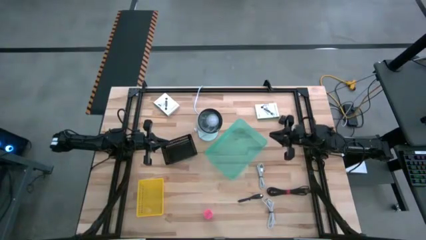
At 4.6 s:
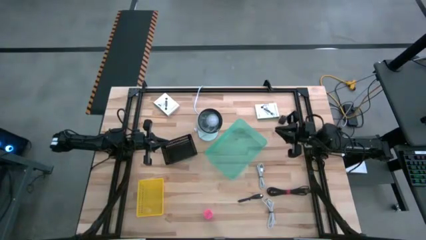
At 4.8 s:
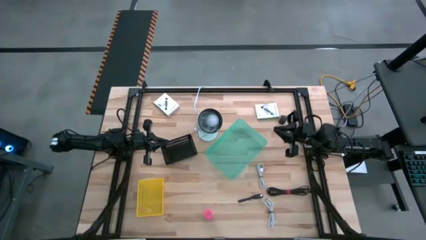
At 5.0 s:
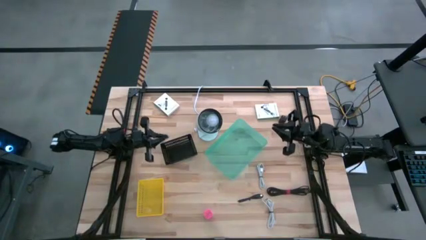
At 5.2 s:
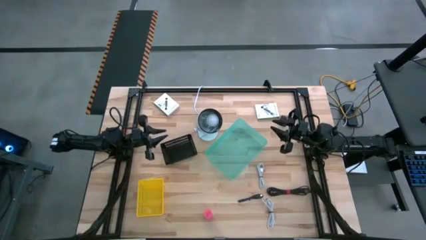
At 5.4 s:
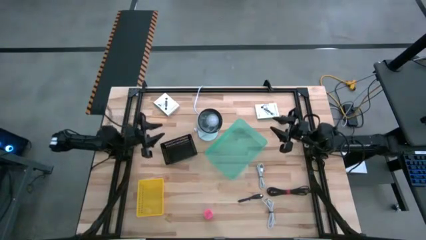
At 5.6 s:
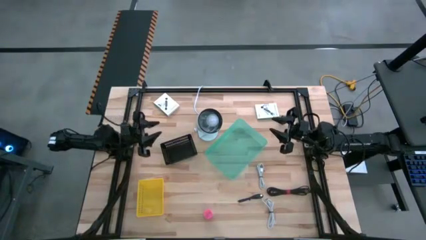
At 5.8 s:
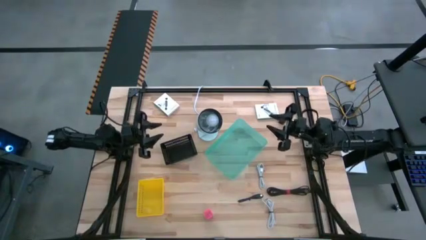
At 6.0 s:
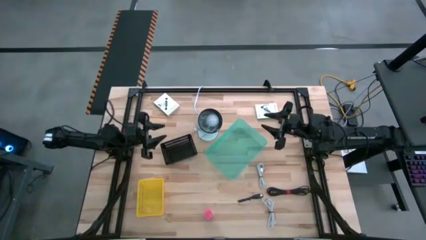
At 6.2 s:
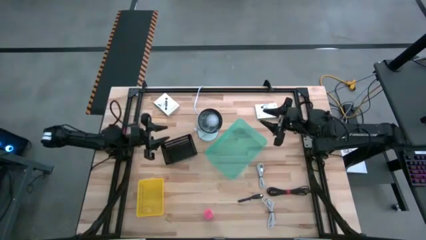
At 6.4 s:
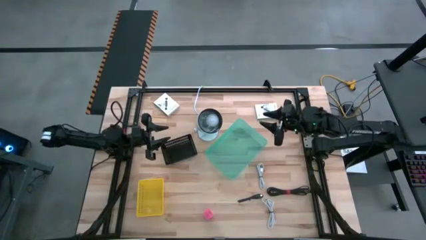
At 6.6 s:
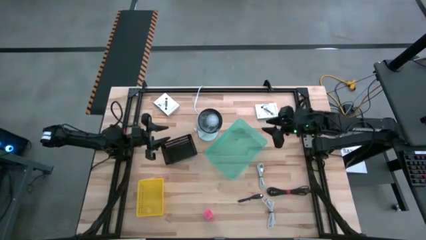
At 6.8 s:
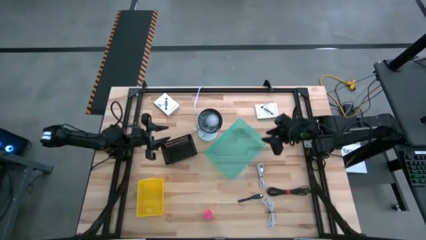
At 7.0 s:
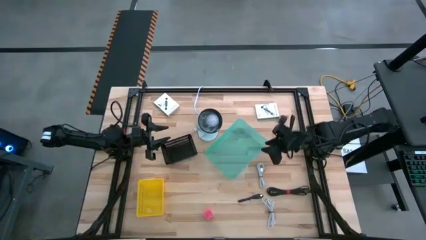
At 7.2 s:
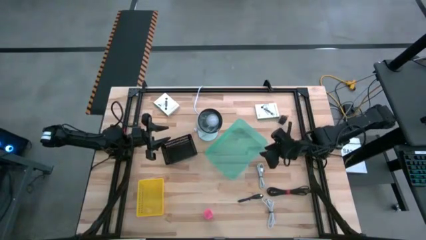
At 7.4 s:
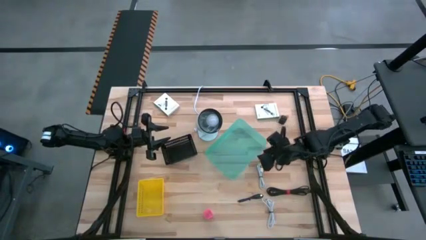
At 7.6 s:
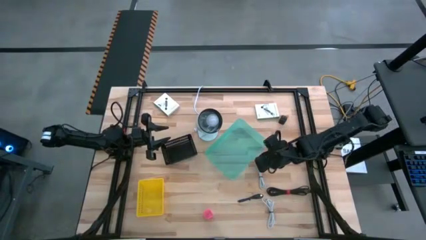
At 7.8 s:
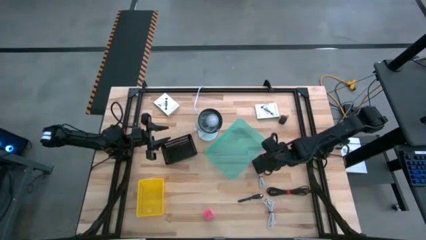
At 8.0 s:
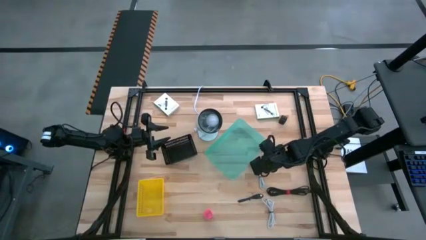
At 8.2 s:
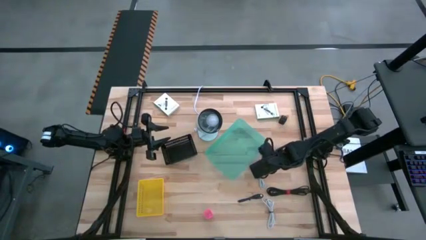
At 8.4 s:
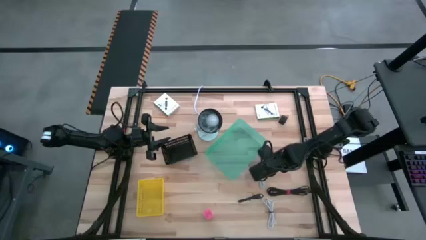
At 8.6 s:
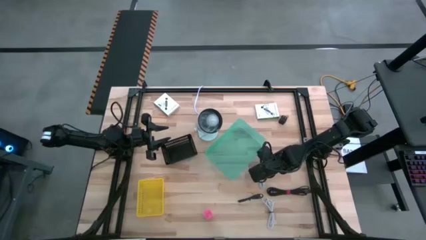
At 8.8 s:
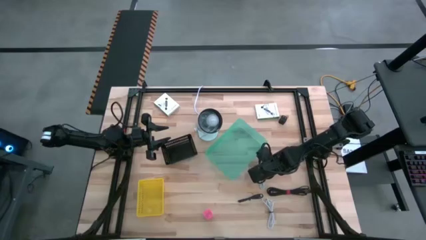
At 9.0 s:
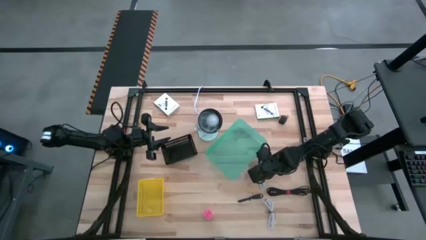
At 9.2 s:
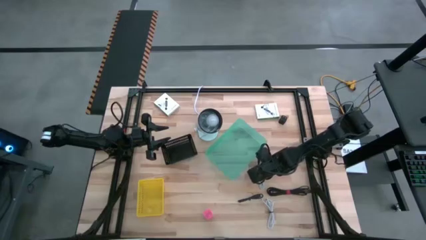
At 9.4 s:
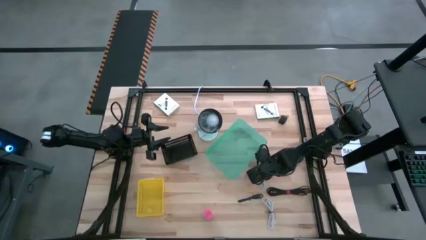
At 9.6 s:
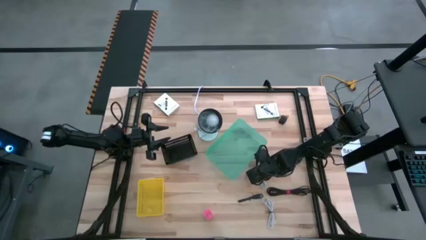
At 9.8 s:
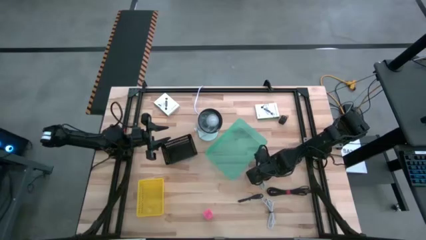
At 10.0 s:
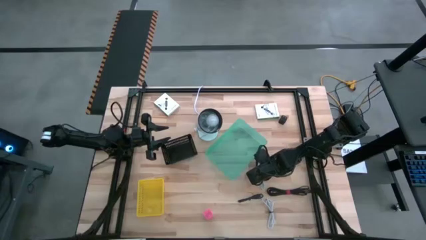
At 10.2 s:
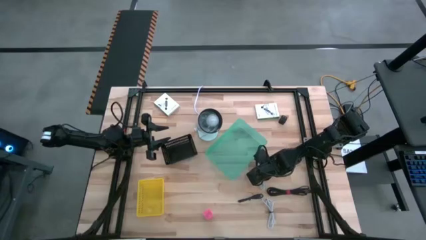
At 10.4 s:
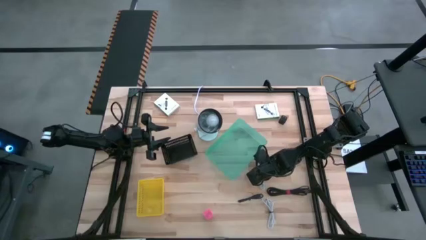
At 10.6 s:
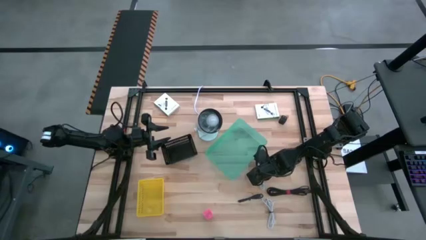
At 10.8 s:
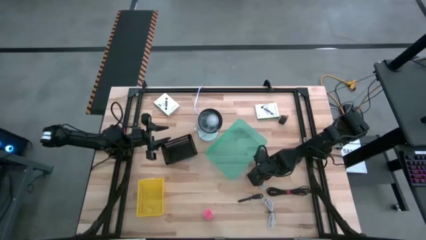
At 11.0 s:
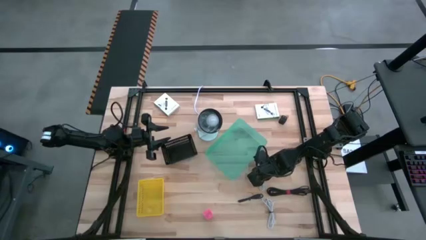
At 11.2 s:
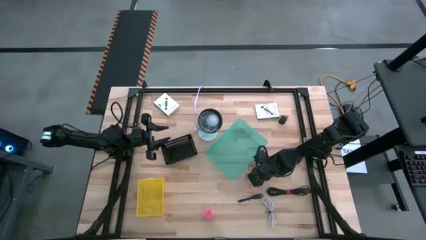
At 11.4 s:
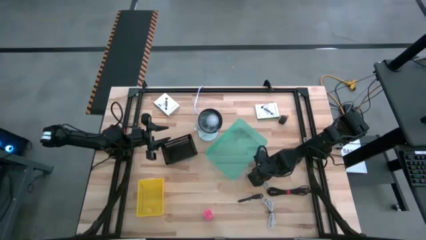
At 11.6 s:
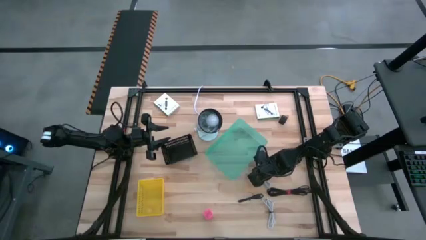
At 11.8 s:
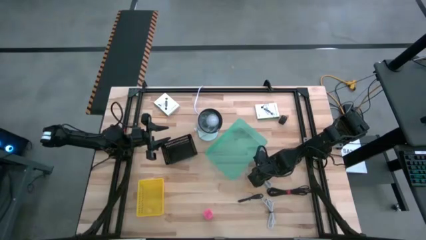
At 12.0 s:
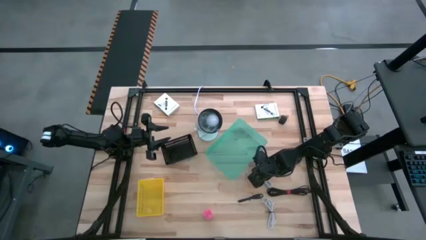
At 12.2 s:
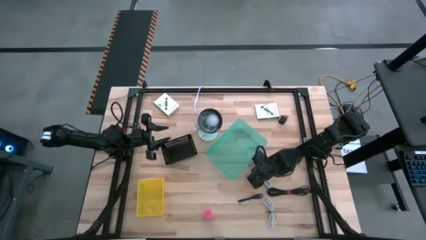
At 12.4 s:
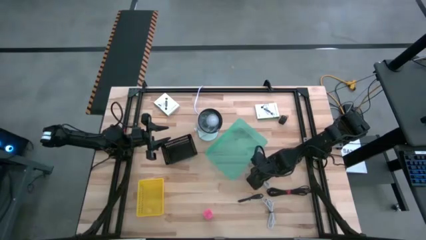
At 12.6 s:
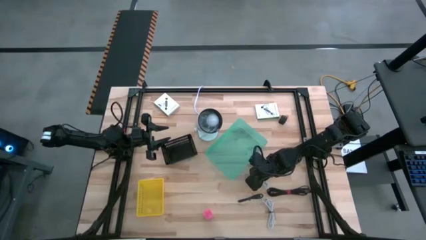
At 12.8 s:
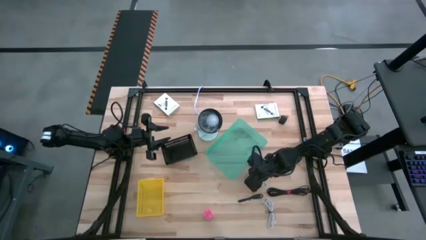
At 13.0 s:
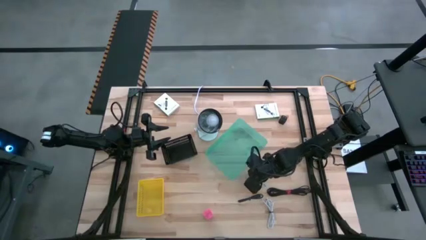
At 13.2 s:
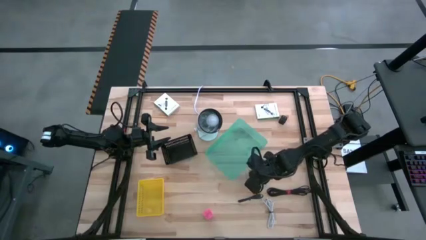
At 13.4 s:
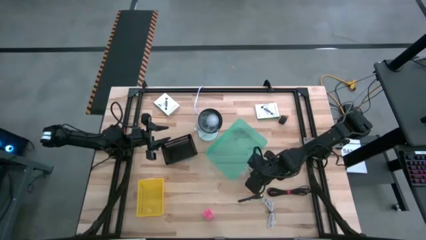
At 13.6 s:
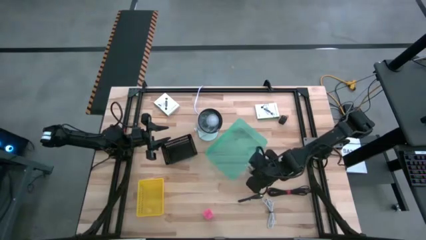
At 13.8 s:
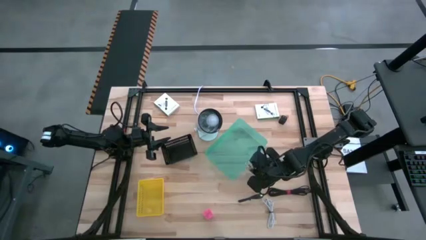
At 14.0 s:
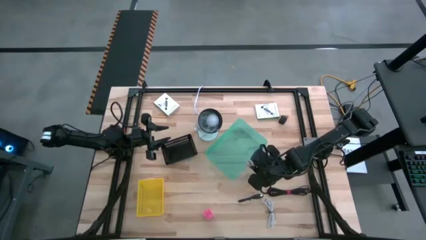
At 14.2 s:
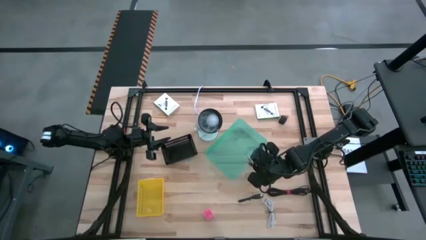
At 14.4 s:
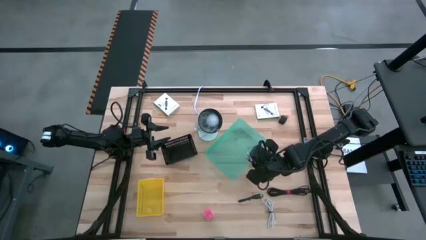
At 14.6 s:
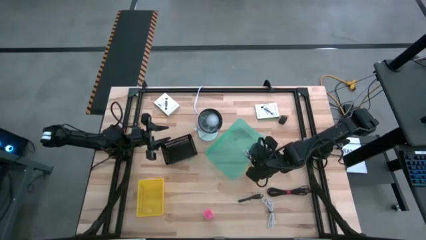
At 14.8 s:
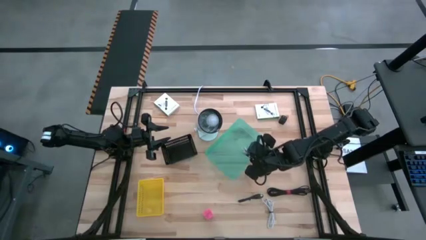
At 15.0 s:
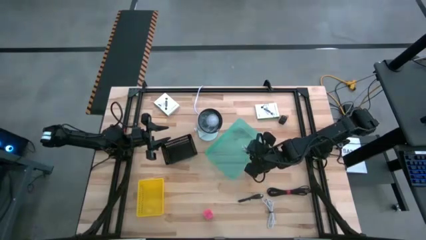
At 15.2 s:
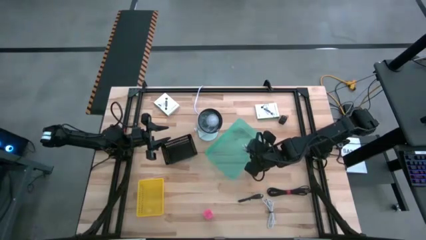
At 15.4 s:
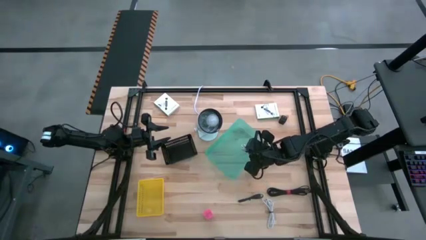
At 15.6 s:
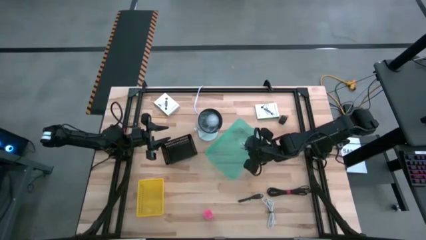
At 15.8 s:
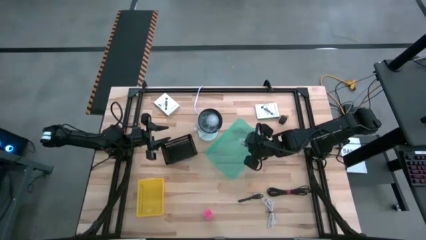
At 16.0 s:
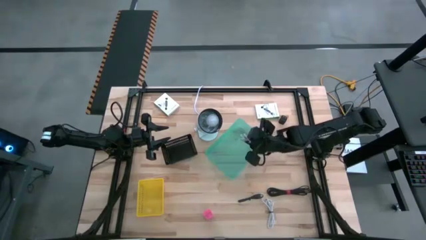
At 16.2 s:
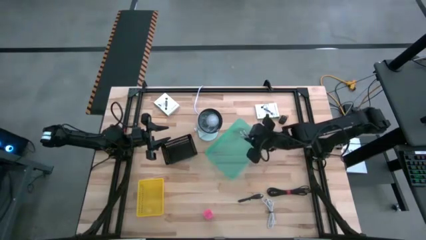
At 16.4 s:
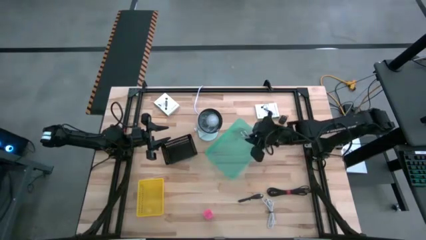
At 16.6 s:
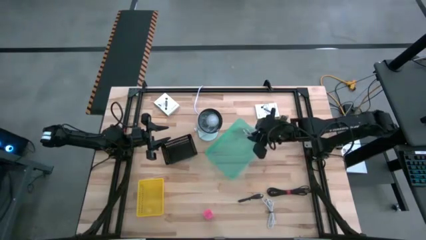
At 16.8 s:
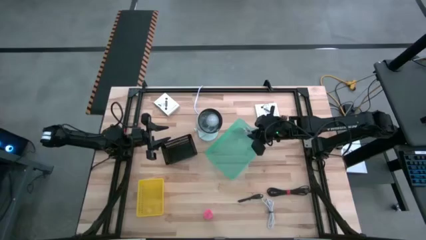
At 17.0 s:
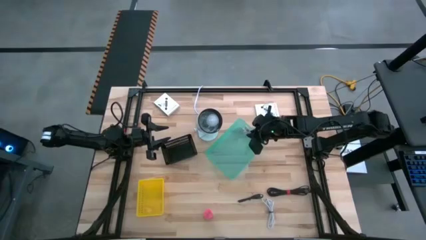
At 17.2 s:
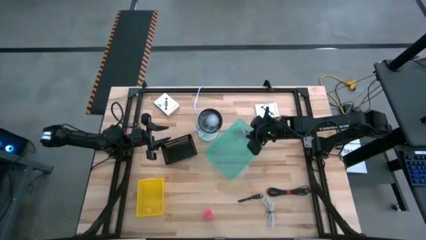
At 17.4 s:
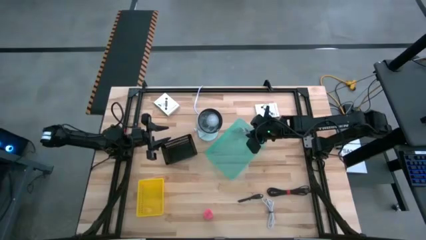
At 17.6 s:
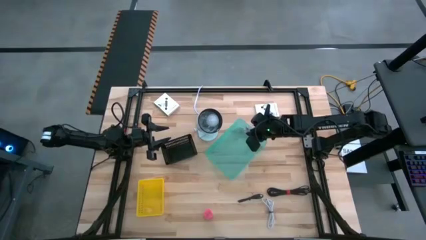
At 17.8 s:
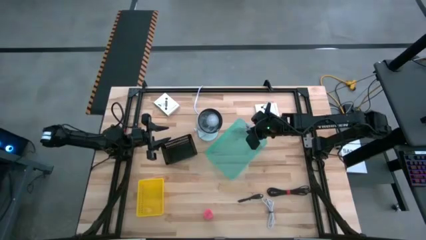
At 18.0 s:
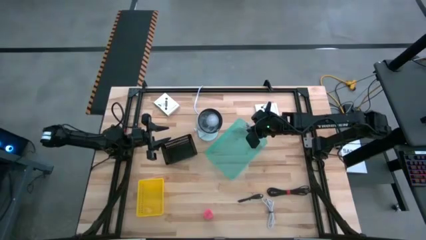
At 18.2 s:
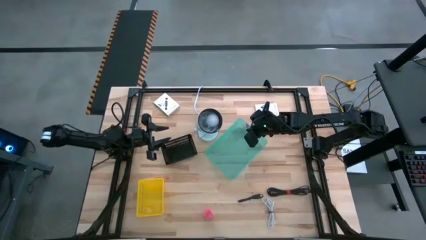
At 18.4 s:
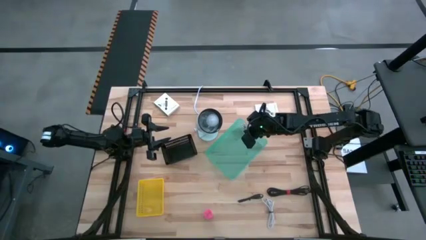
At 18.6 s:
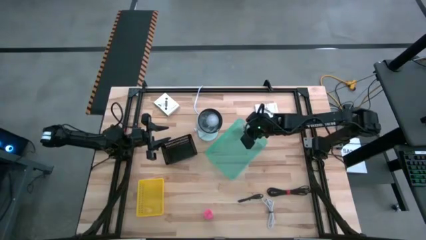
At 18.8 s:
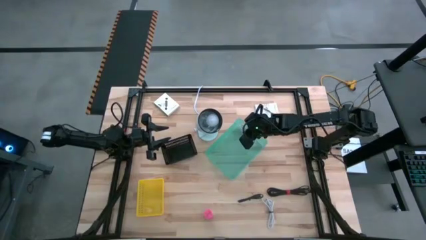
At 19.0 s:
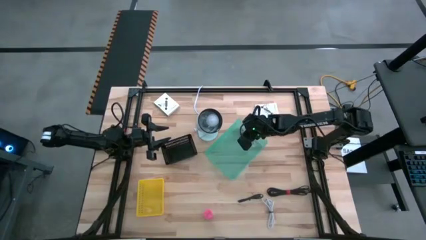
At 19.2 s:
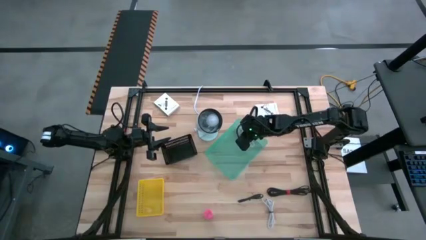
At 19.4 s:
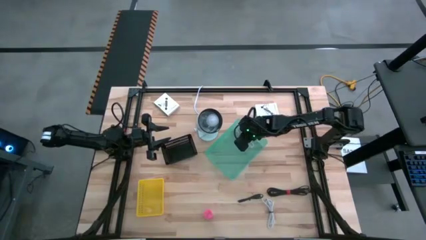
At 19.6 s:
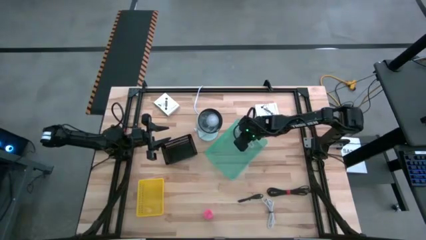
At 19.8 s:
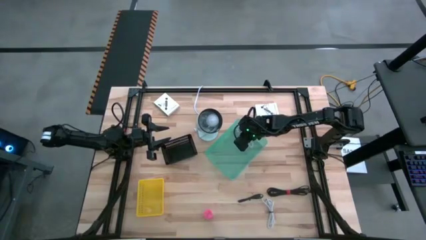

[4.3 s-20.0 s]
Task: Pick and place items into bin
Put the top white charger cable into the green bin
